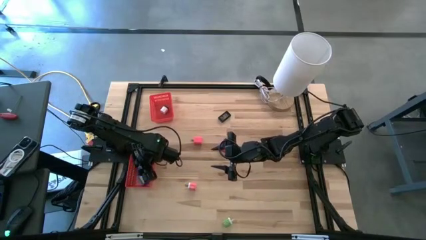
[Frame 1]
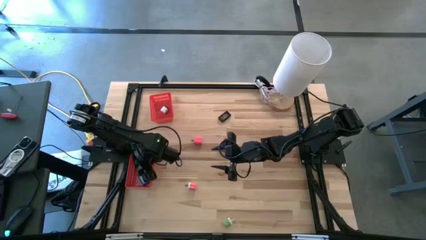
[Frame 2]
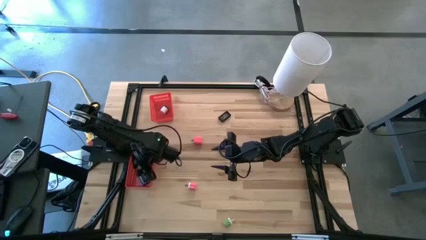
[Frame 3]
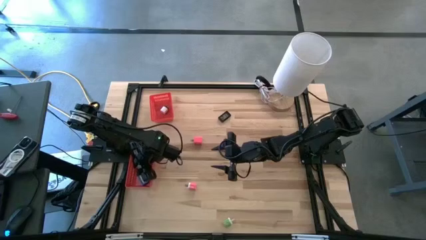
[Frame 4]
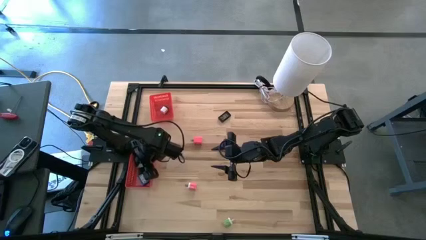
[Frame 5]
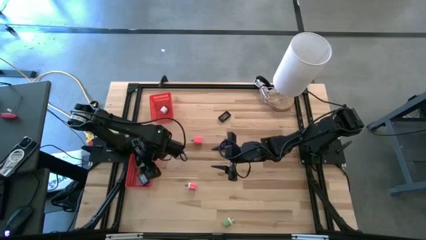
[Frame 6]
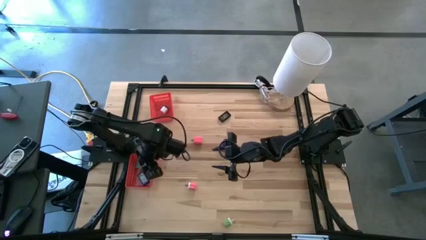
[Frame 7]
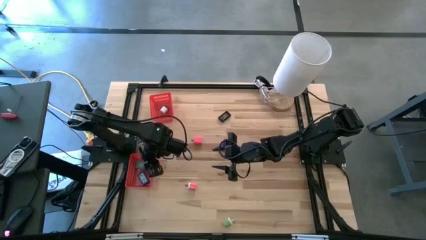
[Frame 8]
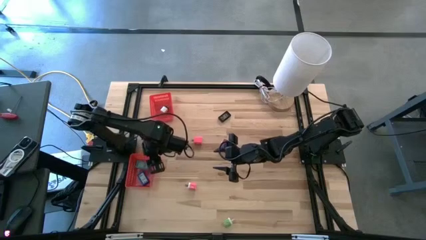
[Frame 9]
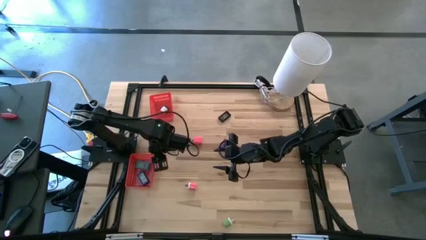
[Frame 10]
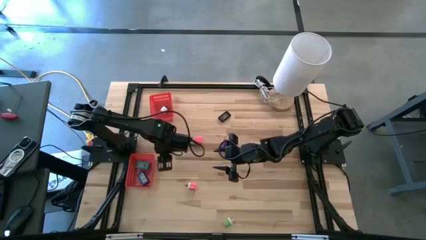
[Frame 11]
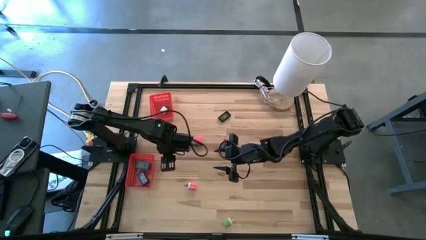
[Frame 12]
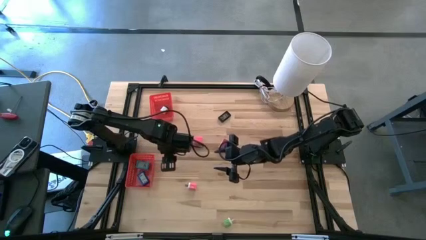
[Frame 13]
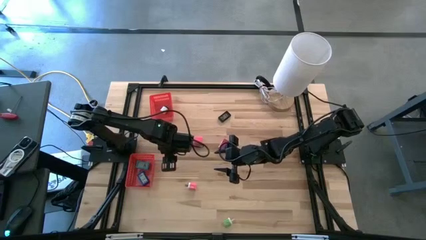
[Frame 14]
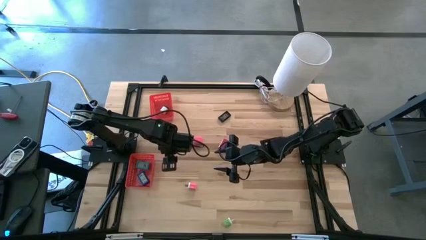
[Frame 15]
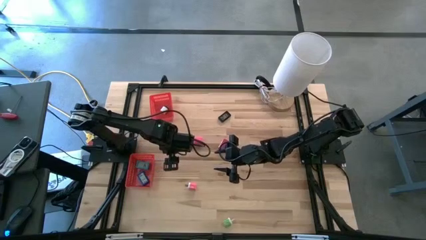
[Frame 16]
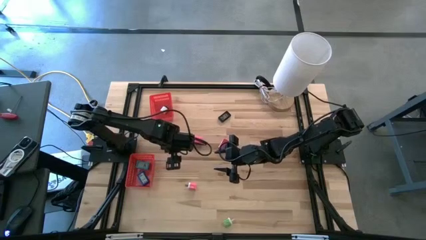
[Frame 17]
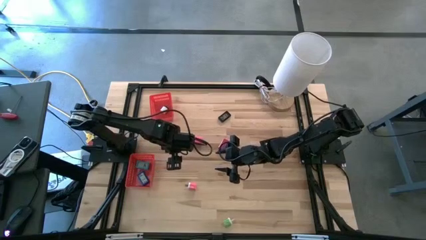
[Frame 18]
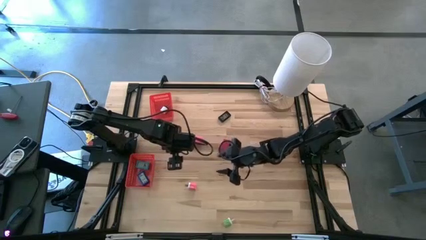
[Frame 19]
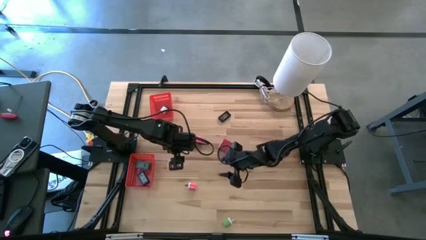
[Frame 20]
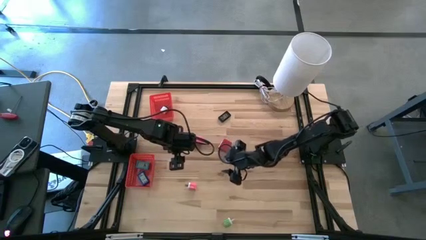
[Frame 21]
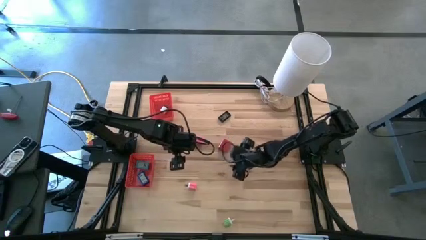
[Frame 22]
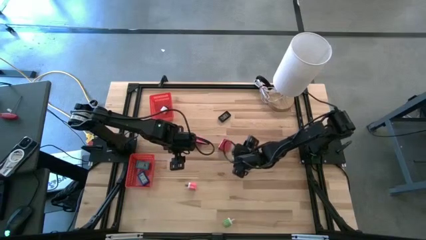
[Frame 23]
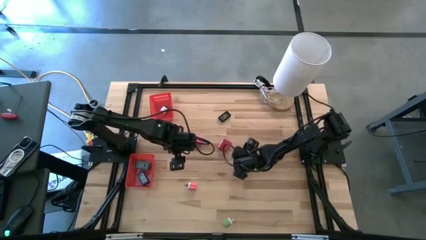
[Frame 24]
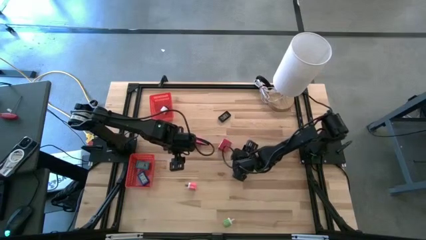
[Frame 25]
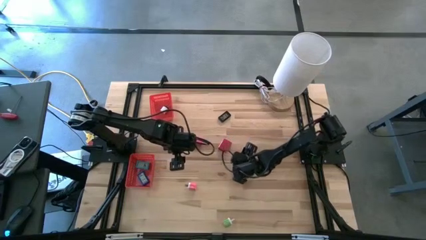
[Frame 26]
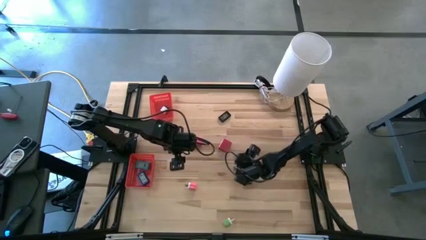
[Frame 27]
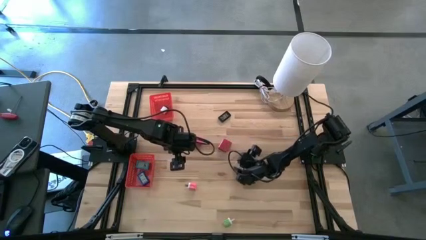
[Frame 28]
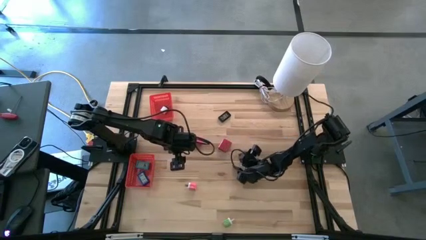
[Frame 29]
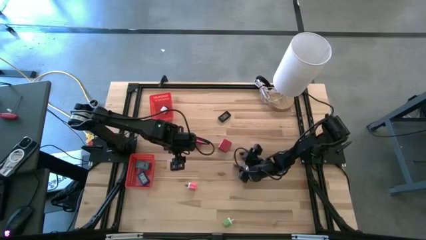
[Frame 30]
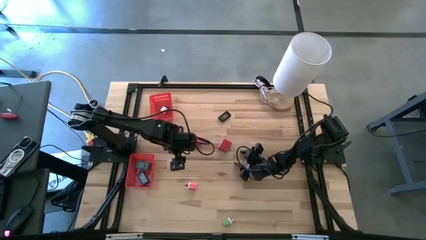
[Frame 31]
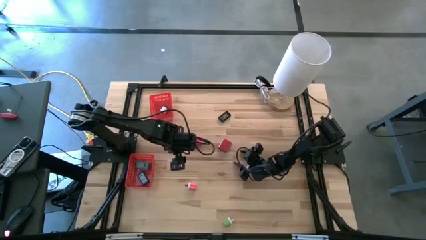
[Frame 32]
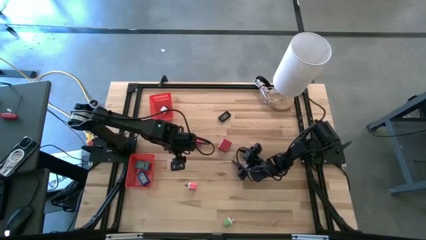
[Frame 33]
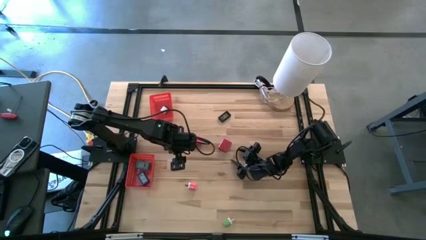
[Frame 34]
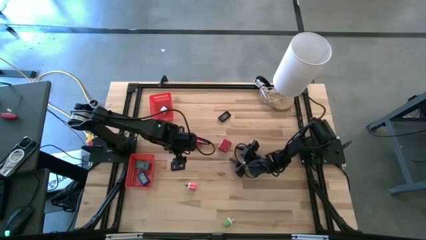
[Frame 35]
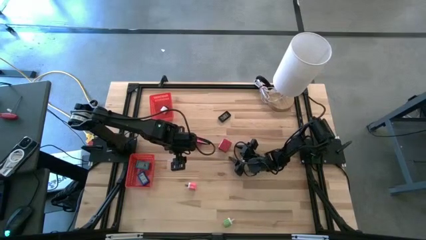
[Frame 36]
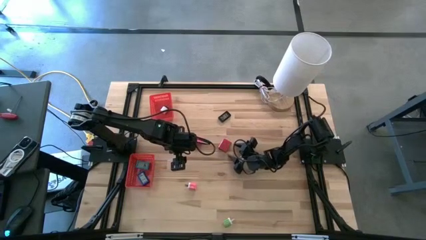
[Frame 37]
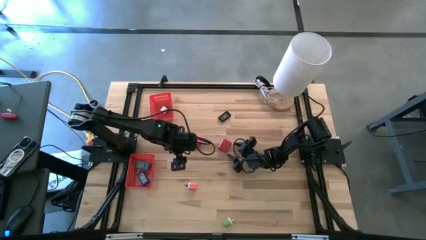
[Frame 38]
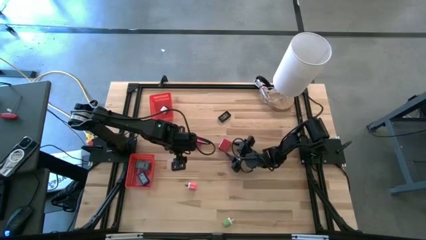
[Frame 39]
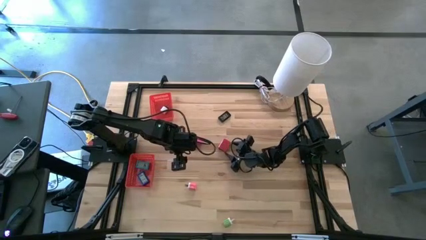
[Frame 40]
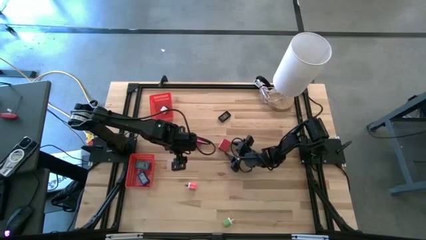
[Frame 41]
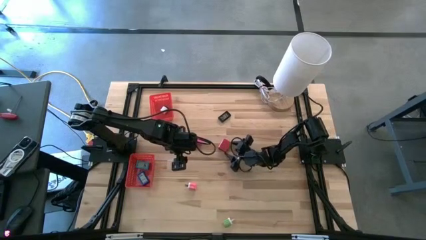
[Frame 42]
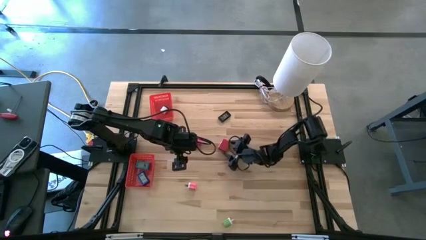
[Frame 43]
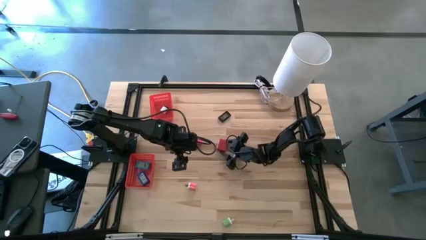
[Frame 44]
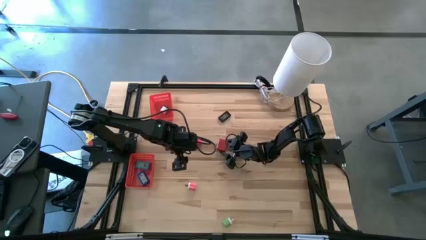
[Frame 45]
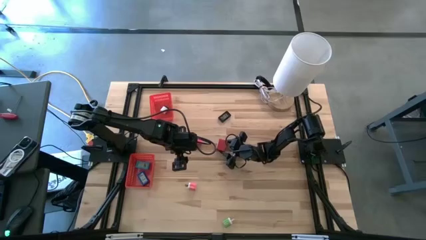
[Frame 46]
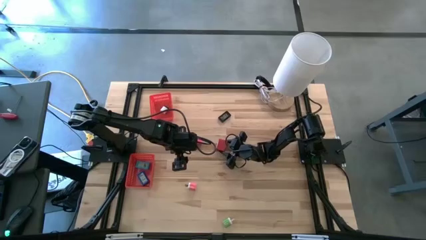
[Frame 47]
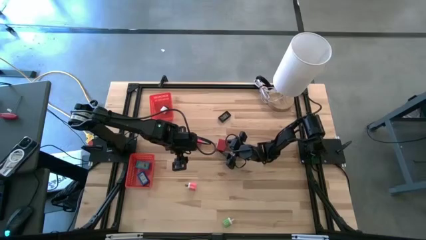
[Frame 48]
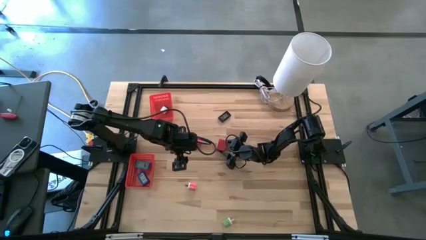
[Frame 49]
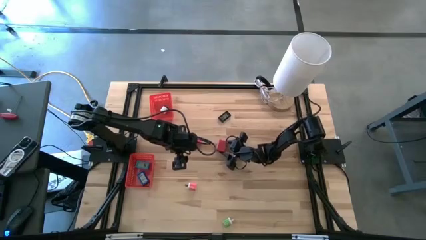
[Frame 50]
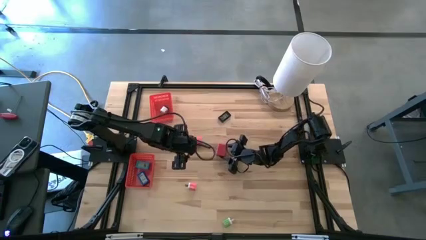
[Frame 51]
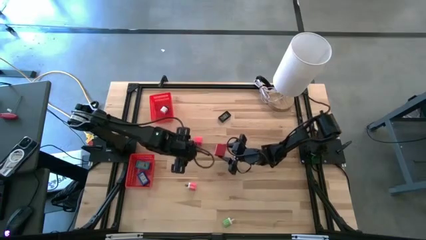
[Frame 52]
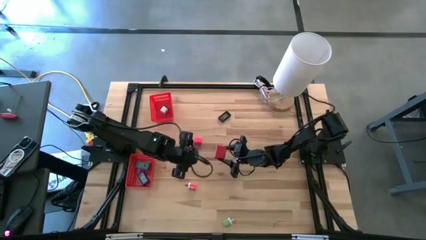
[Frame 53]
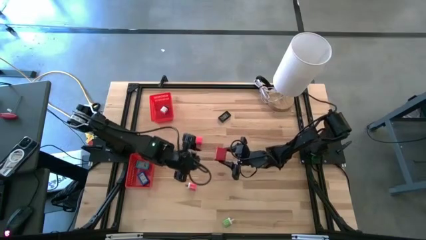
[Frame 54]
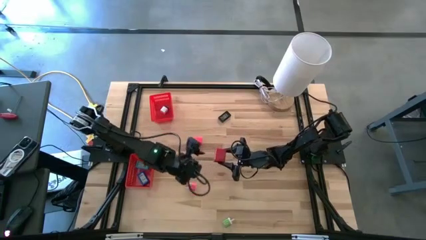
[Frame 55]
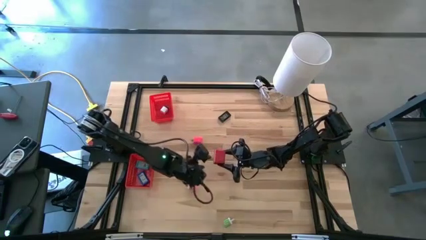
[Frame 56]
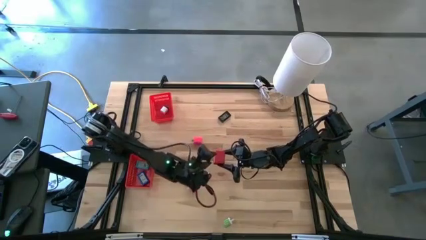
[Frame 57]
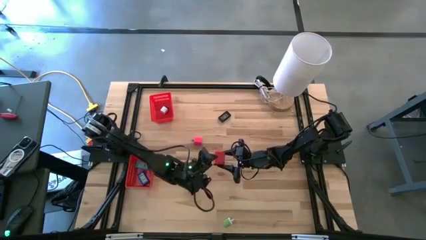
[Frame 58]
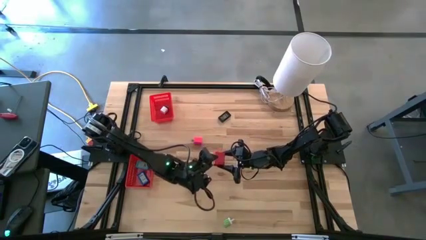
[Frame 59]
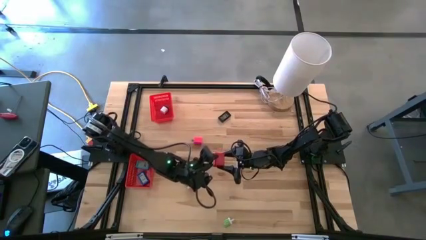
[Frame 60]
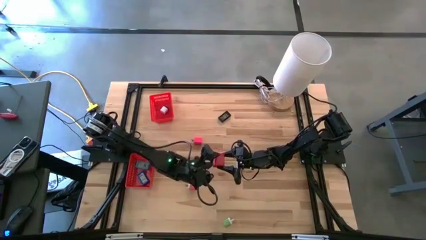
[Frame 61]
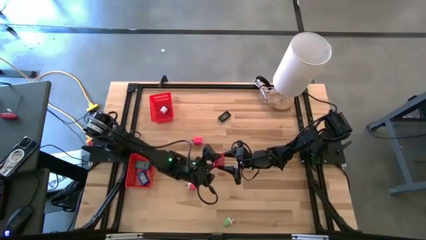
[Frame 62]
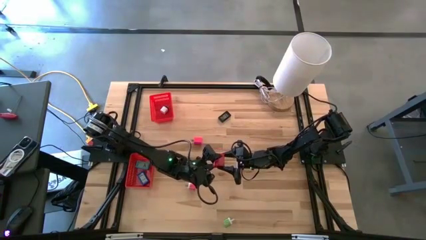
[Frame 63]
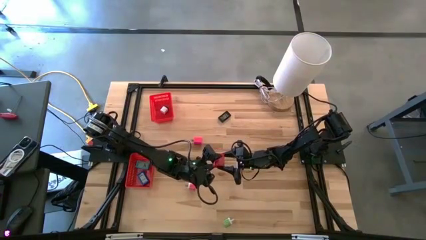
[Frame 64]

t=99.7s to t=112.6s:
Task: Pick & Place Office items
Put the red charger adapter into the top red bin
